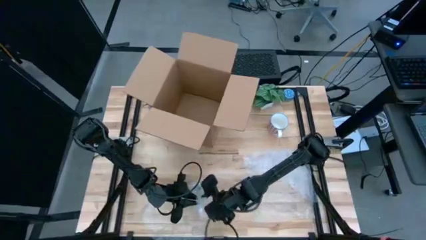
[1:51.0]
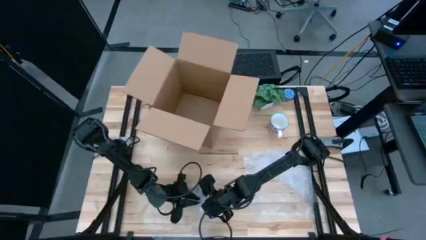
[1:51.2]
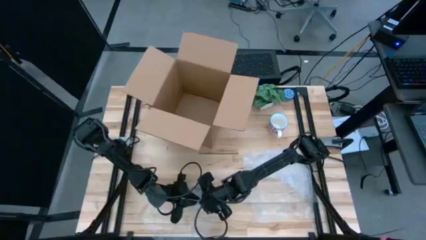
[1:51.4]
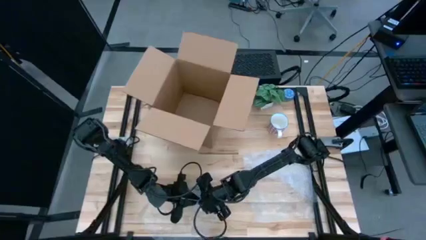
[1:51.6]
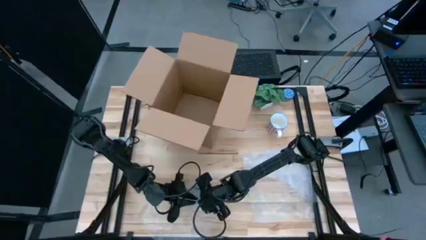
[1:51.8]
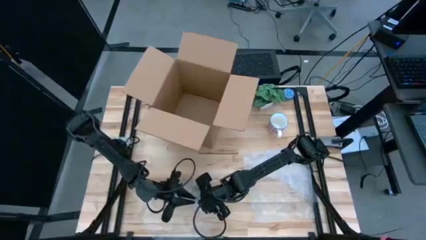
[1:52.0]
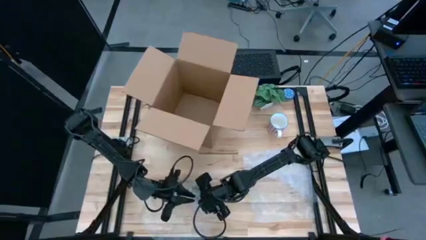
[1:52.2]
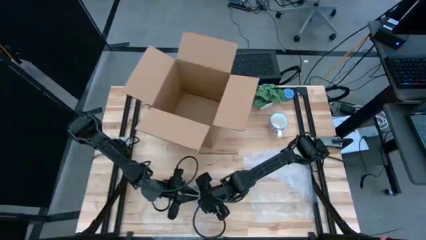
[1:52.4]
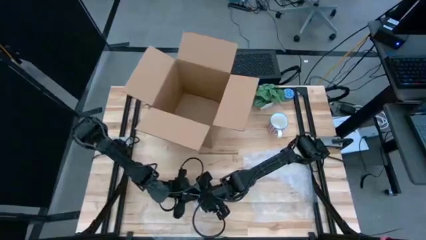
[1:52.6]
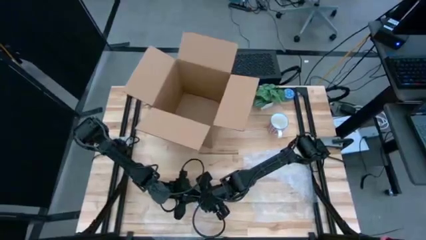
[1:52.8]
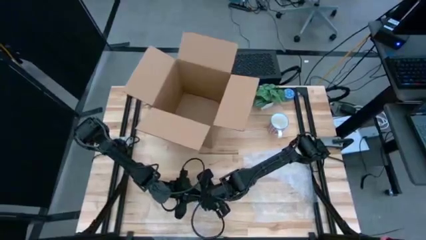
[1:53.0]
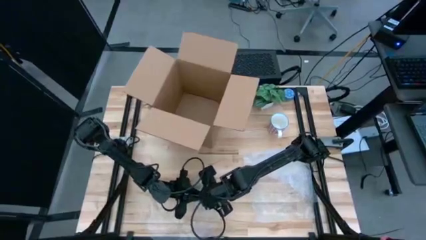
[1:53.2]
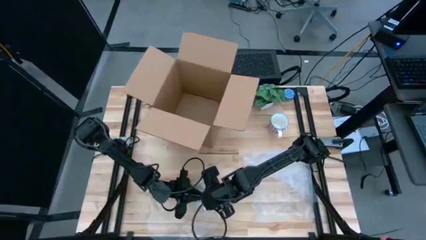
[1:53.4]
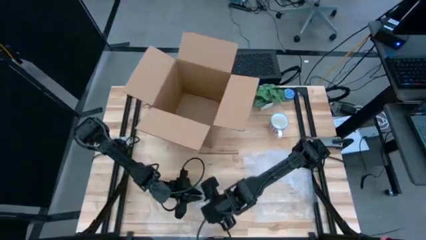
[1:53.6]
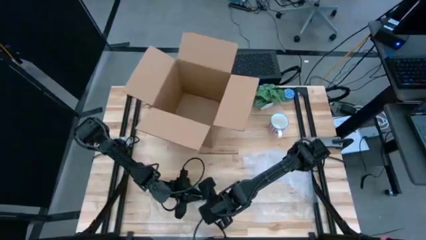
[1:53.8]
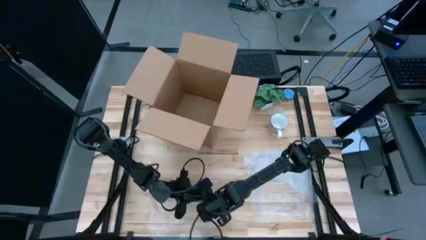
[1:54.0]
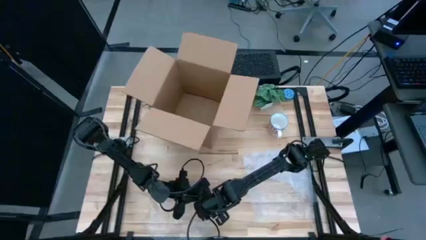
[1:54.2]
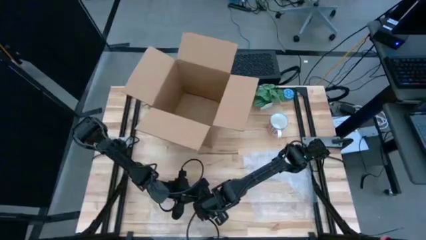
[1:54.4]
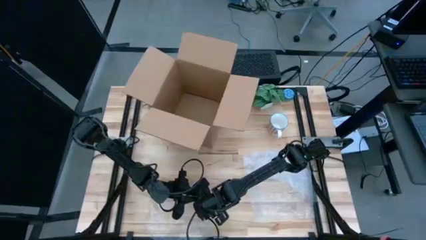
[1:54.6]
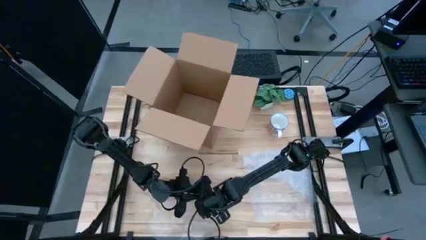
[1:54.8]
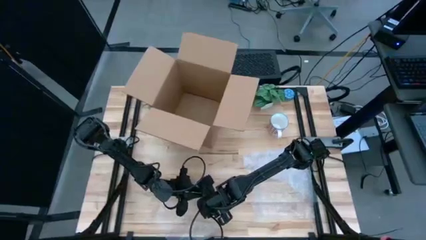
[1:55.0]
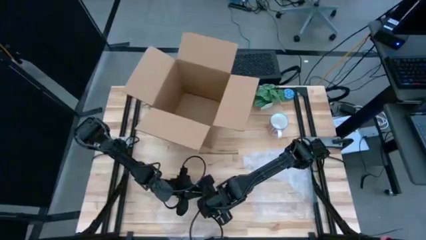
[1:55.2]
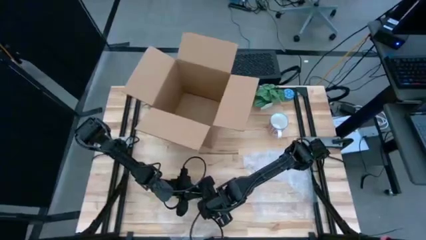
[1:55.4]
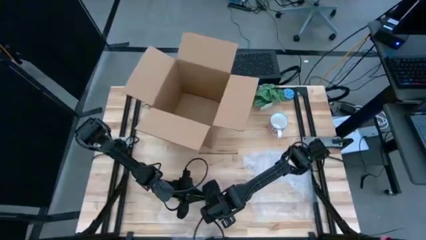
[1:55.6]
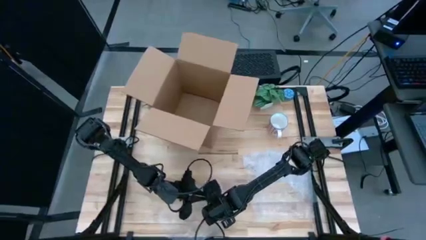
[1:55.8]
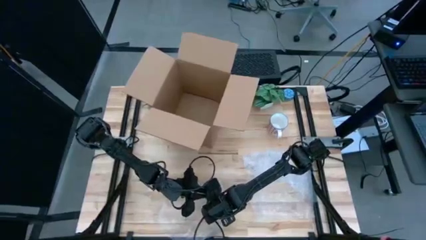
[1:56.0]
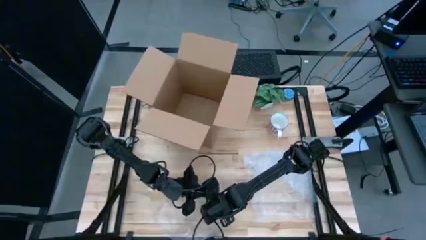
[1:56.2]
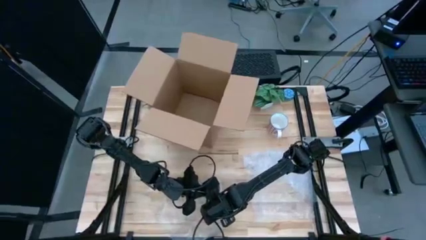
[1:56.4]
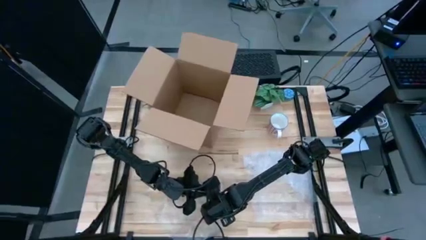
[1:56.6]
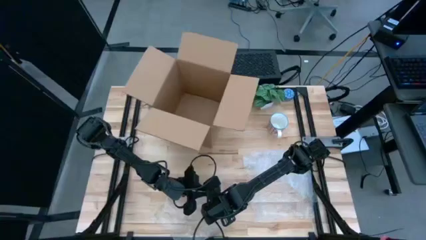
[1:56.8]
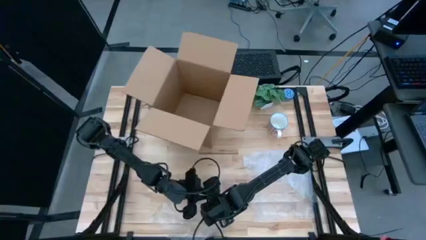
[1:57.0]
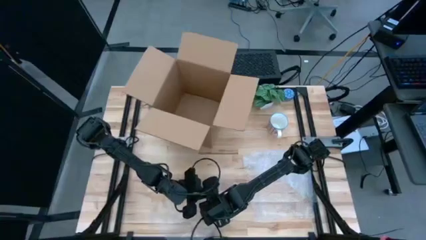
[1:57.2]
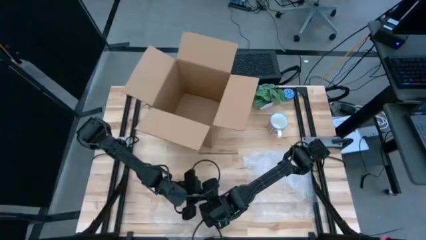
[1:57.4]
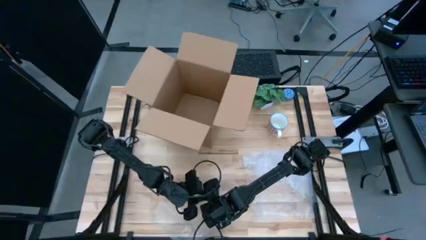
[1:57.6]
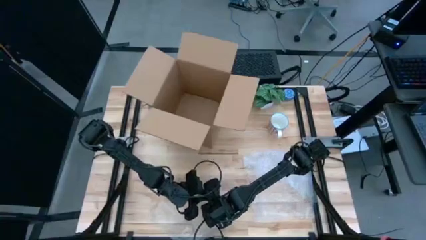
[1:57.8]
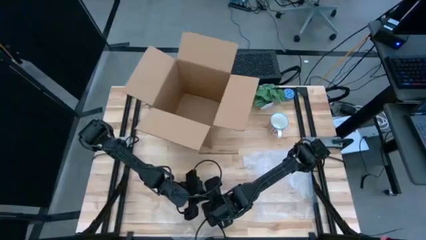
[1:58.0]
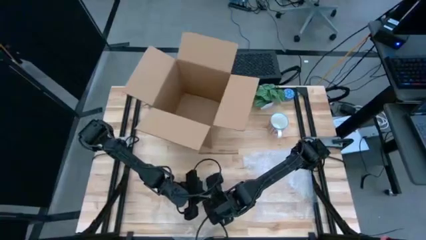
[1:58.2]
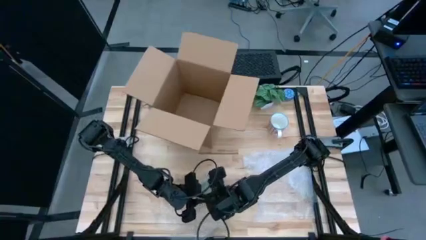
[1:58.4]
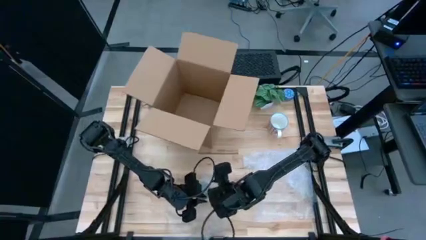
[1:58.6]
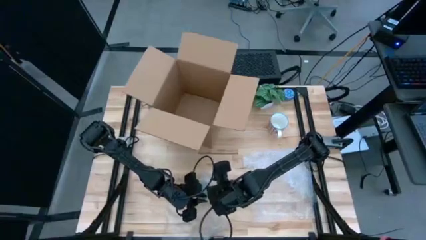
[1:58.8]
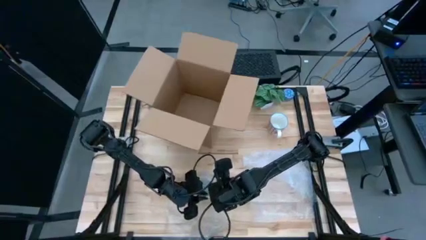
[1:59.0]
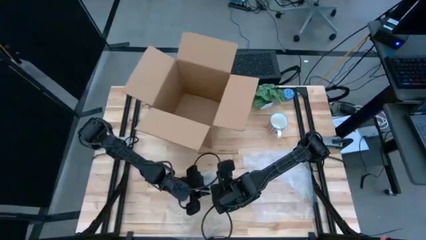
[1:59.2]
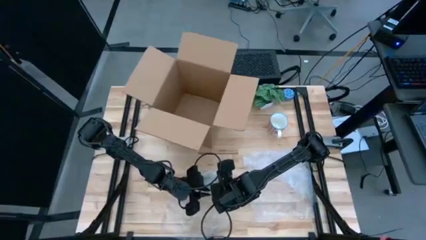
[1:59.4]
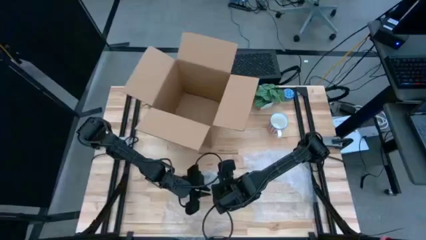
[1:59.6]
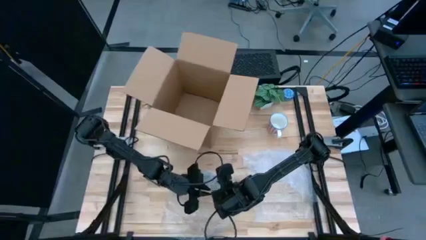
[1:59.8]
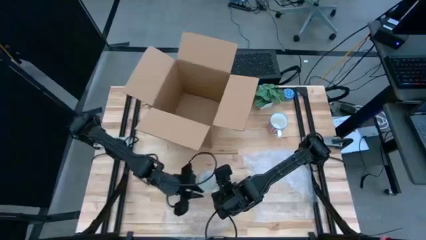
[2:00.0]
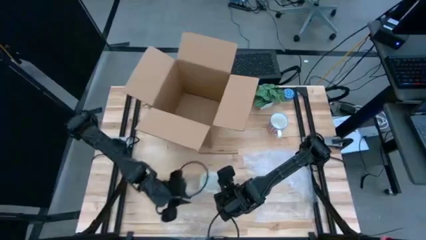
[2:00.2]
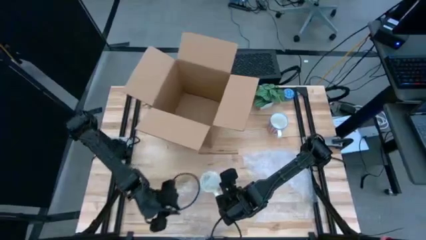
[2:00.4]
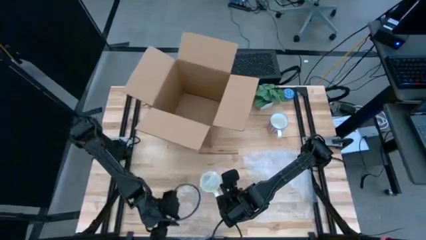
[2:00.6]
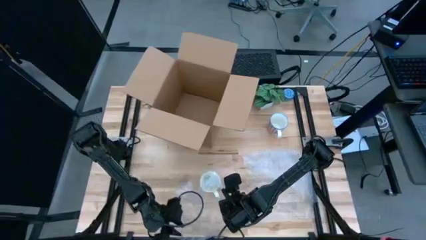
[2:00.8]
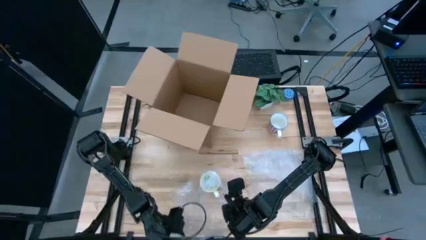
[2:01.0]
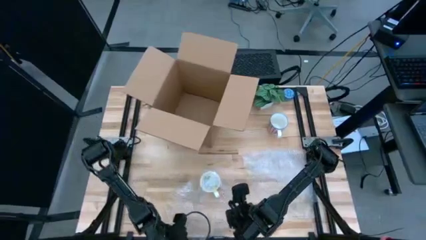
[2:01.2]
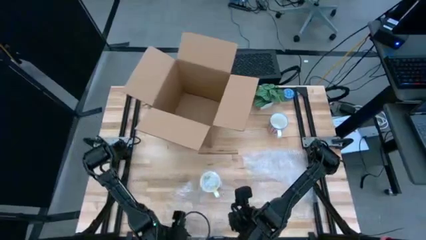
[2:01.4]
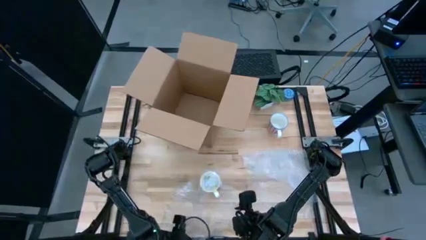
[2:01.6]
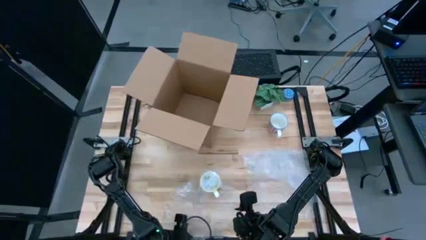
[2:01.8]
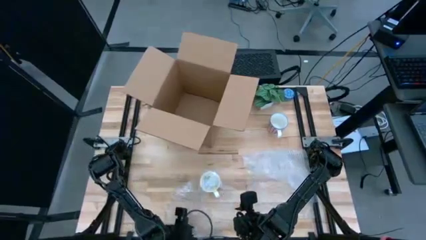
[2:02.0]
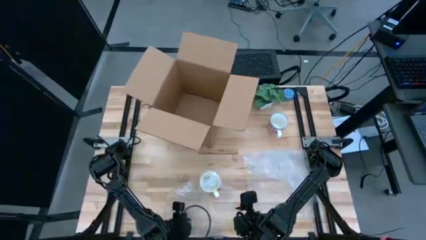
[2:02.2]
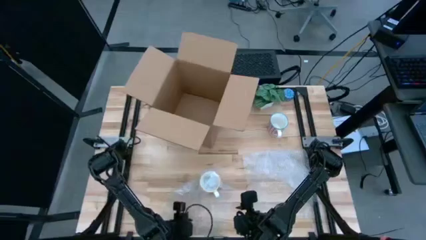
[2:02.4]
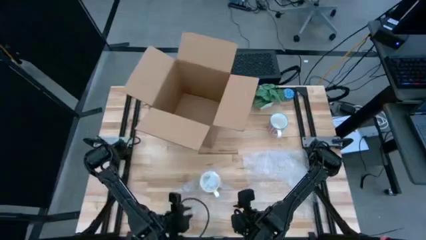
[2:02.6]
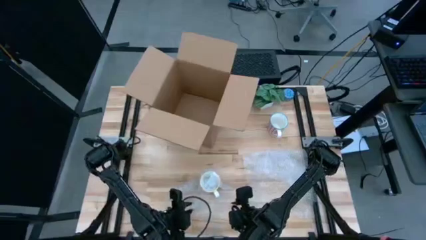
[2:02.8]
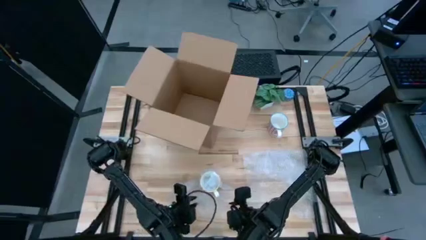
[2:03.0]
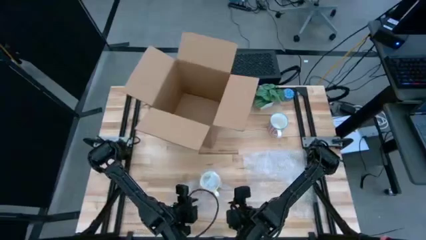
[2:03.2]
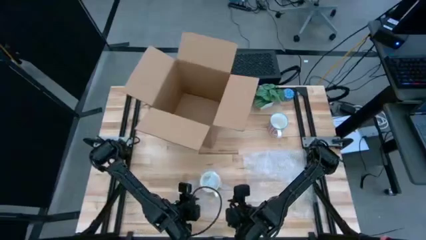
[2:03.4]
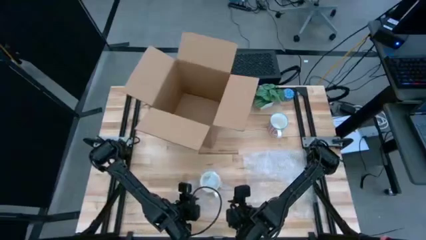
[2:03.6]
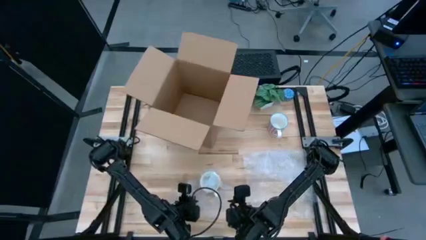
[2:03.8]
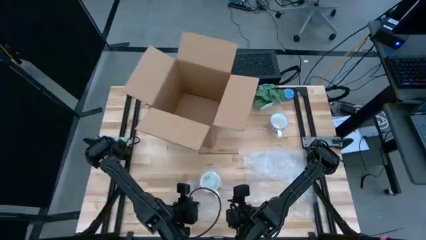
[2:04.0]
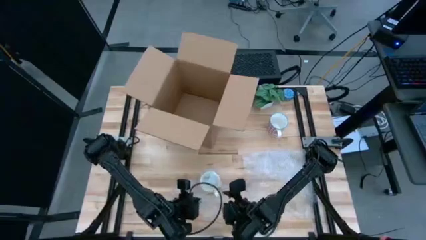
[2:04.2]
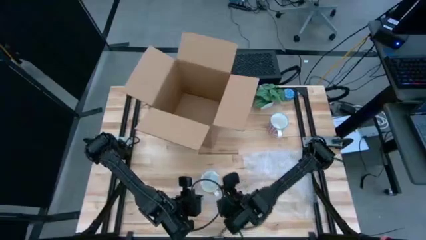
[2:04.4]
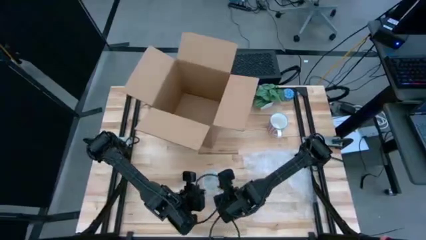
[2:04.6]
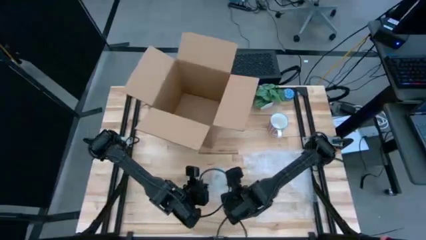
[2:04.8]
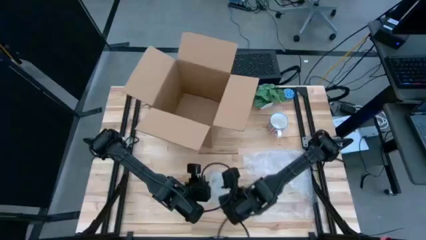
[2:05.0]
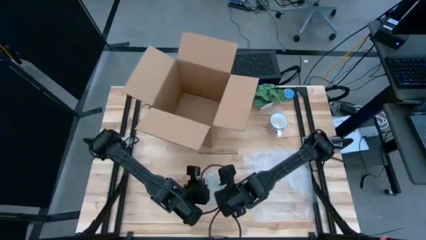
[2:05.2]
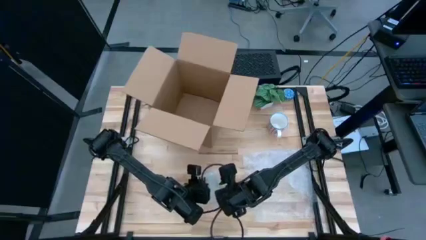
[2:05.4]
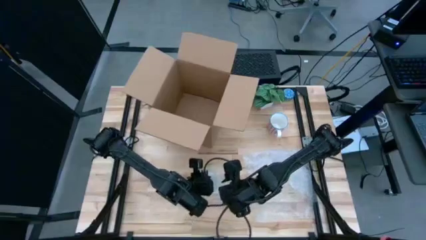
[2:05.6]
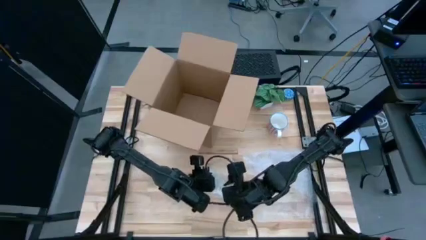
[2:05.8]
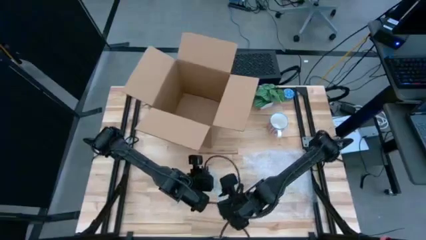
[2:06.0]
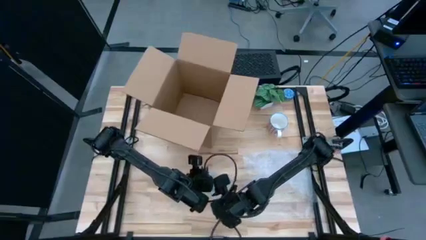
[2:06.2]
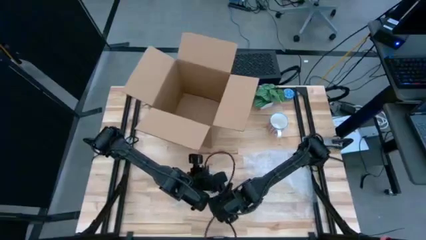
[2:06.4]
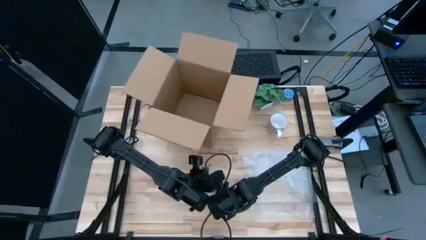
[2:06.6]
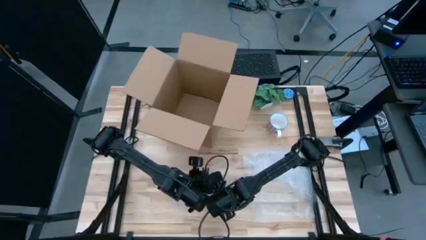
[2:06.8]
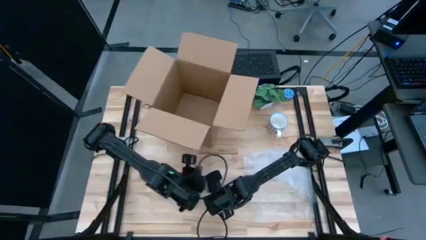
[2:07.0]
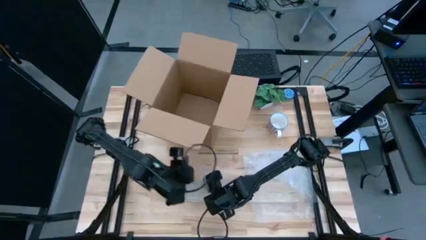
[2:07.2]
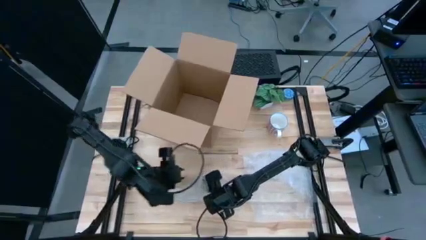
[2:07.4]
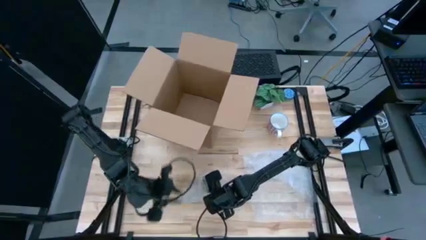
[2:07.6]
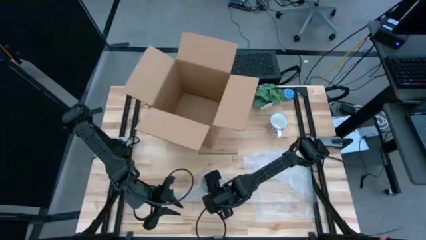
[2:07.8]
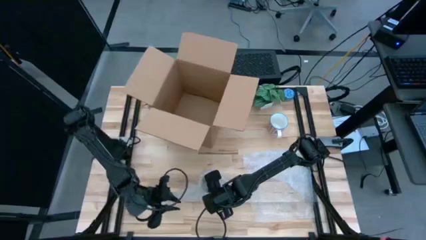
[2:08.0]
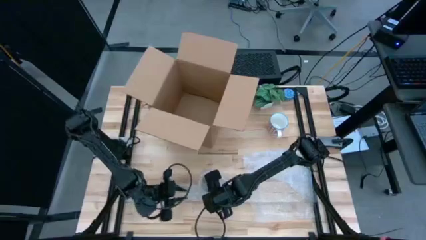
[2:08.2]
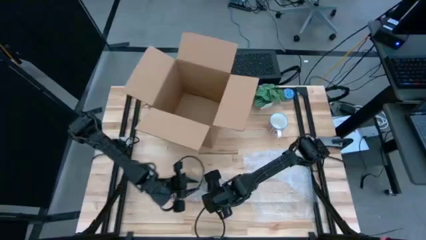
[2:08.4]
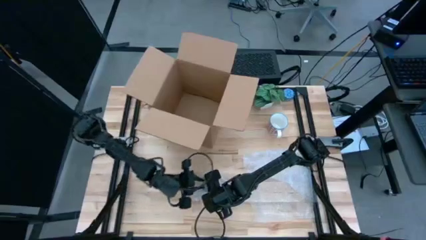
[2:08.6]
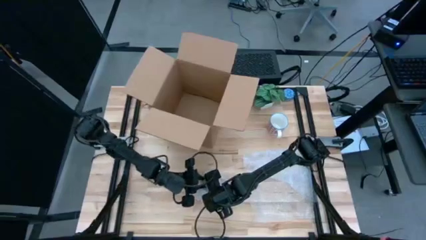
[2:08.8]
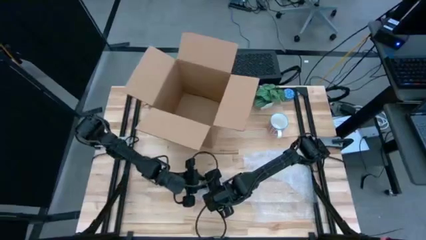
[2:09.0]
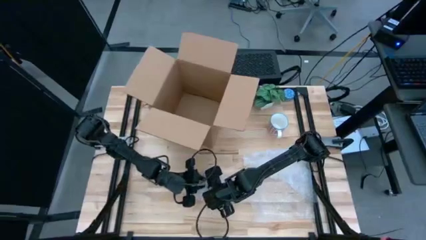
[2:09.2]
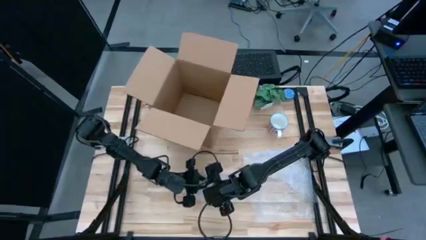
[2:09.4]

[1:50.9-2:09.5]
Task: wrap mug
Wrap the yellow mug with bubble wrap
